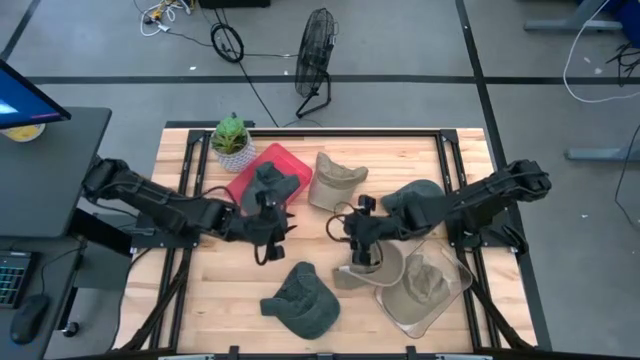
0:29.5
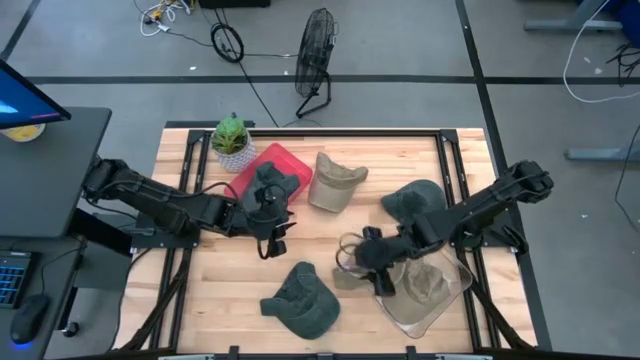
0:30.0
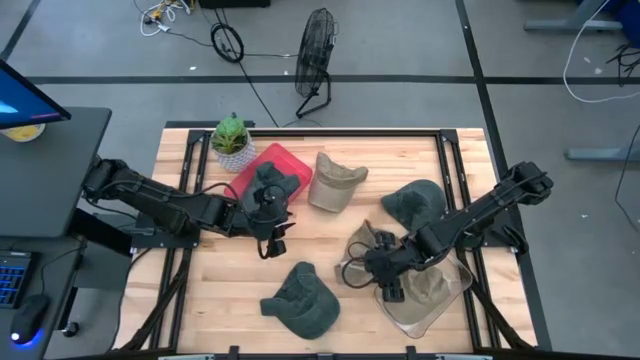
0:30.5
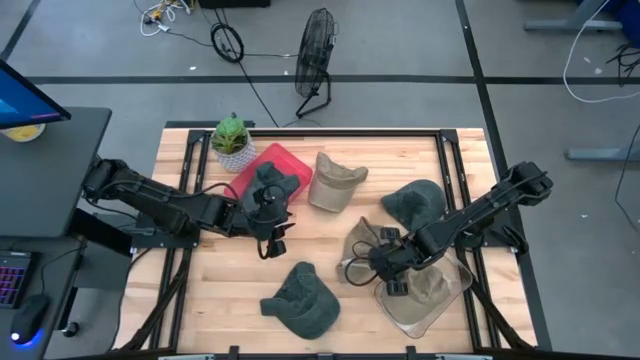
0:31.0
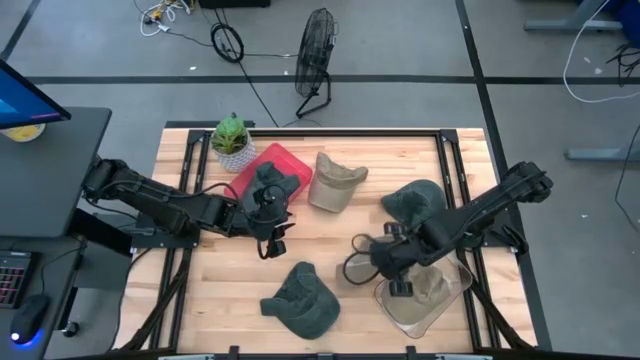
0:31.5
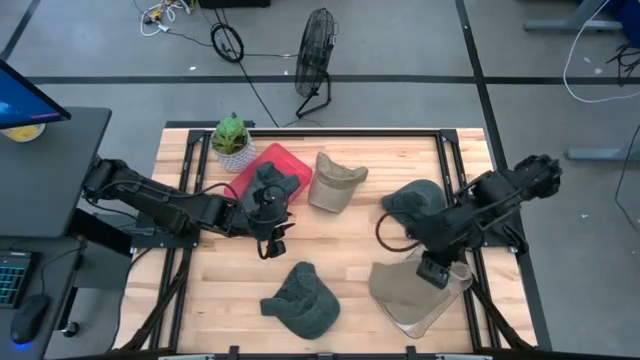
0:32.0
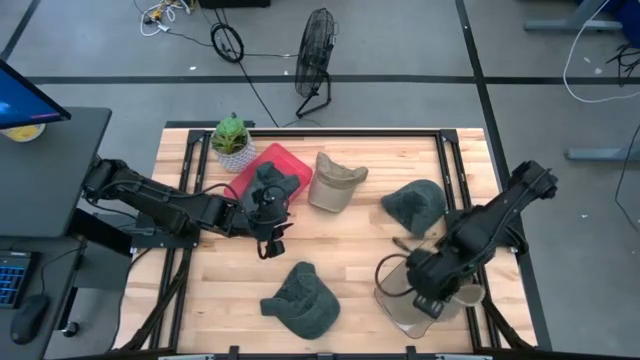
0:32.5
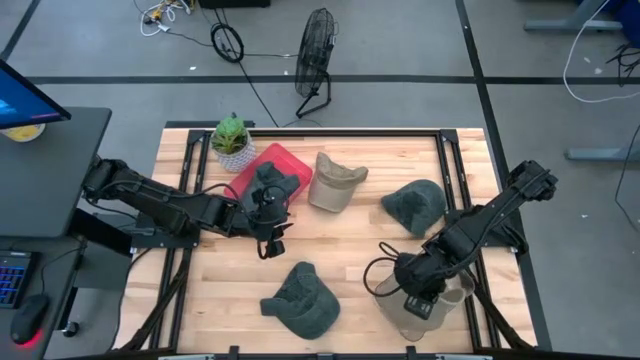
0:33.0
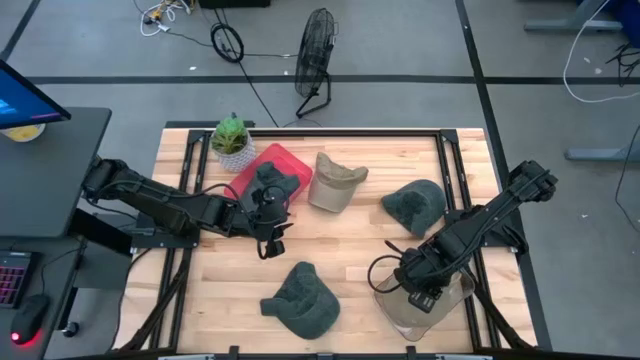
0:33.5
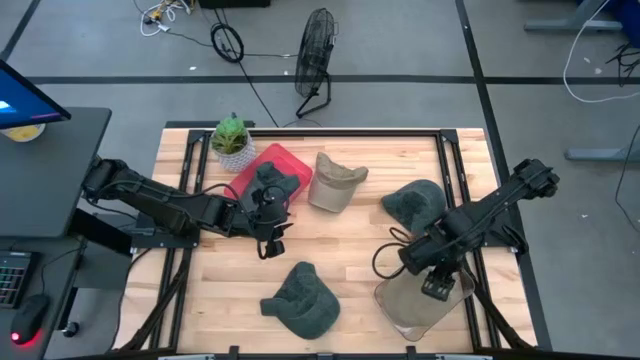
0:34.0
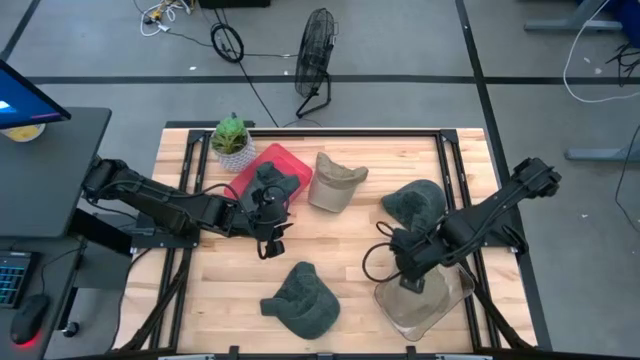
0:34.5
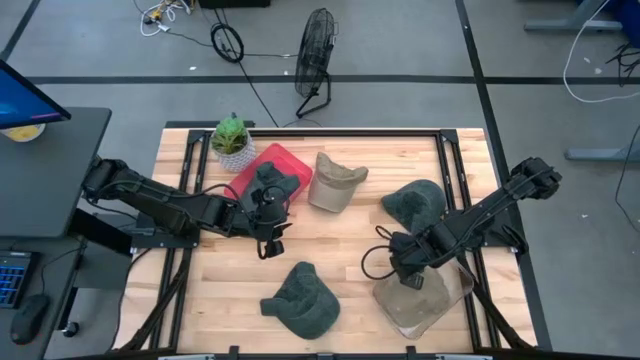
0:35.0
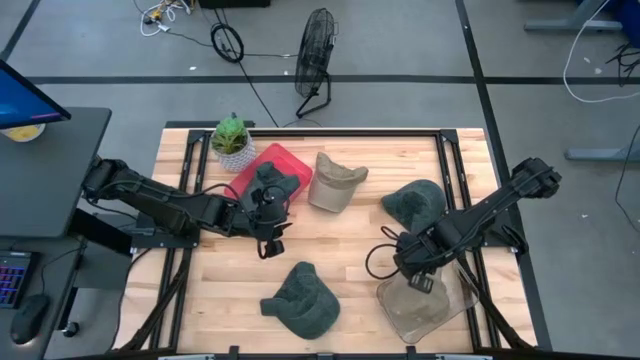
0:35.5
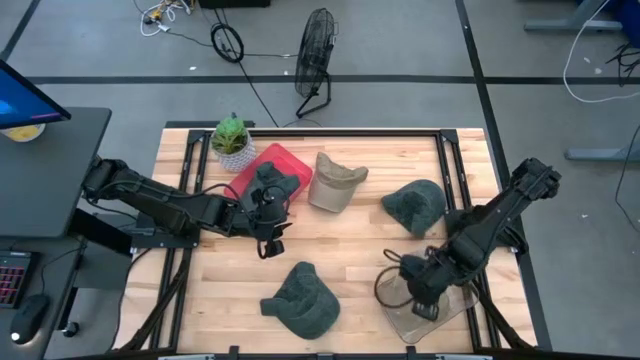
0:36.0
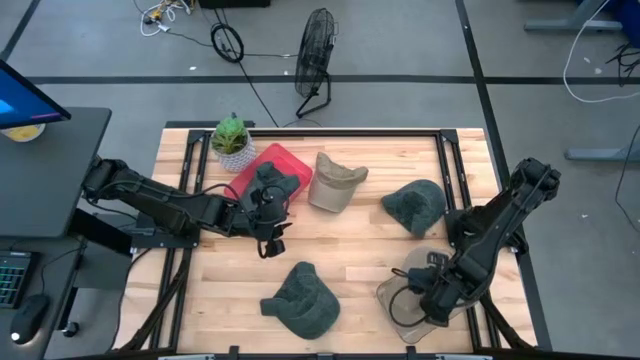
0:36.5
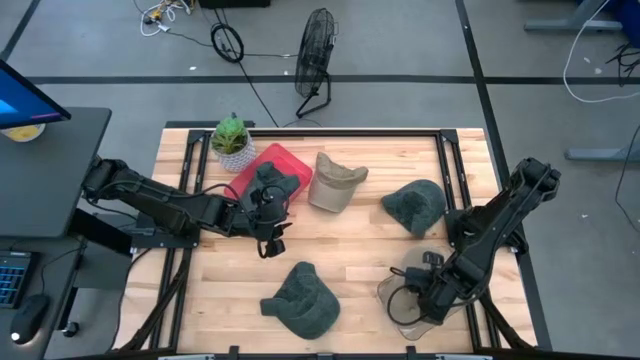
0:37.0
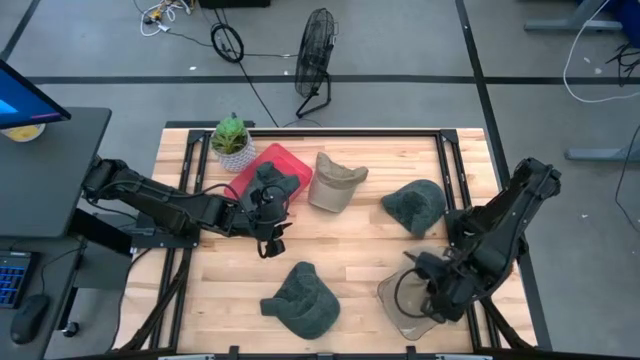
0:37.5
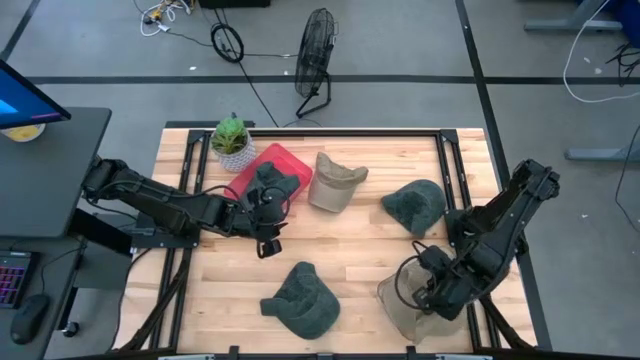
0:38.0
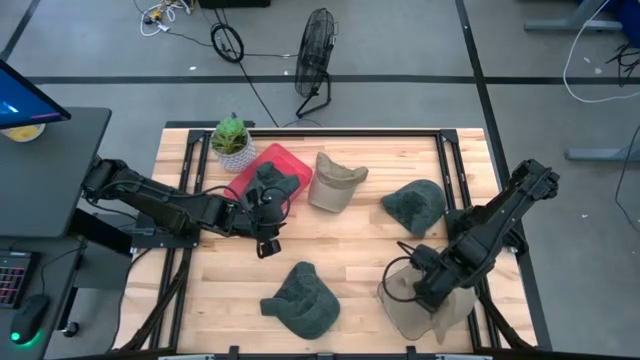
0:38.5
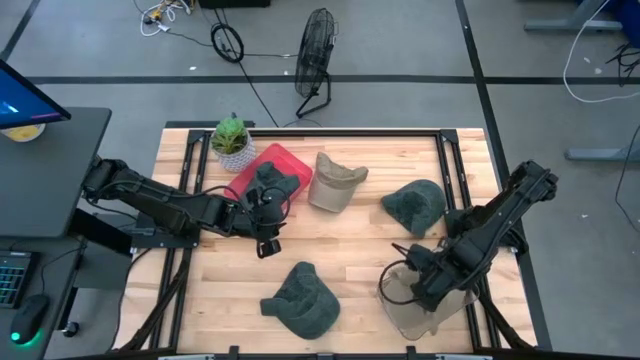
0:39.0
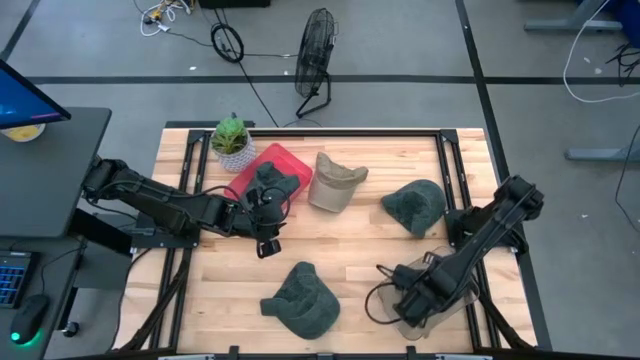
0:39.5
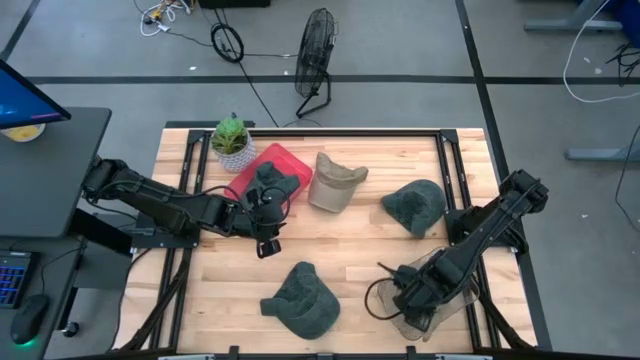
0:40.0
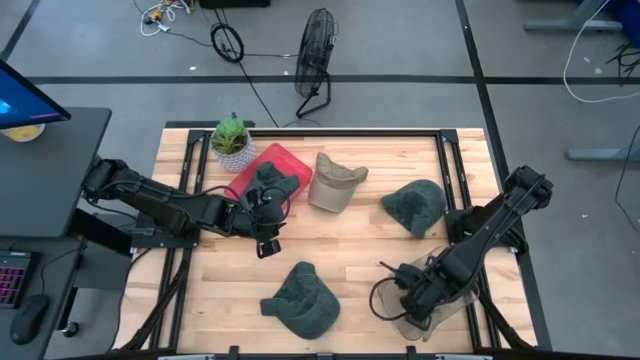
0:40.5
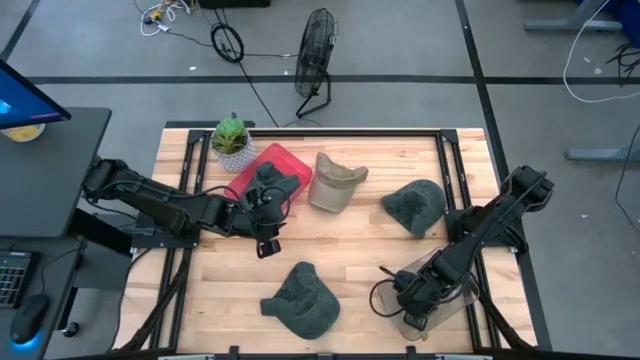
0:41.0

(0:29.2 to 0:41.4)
Task: Pick & Place hat
Put the bottom gray cap into the transparent bin

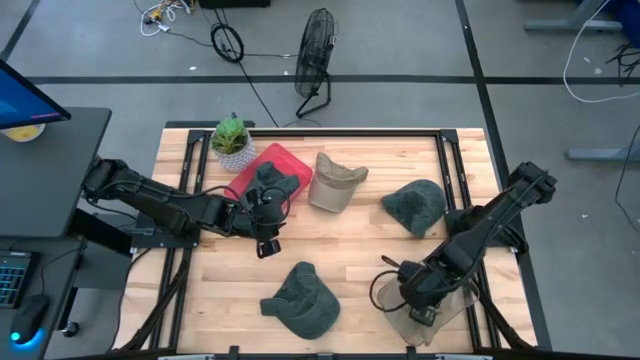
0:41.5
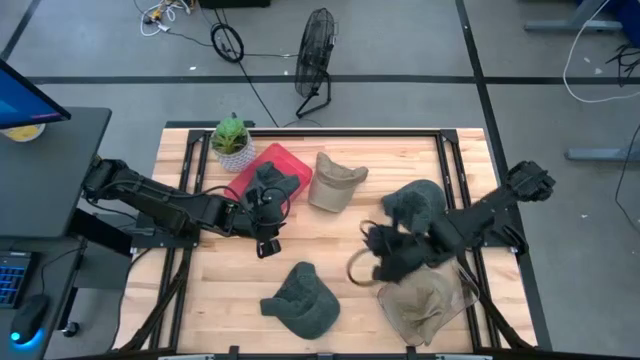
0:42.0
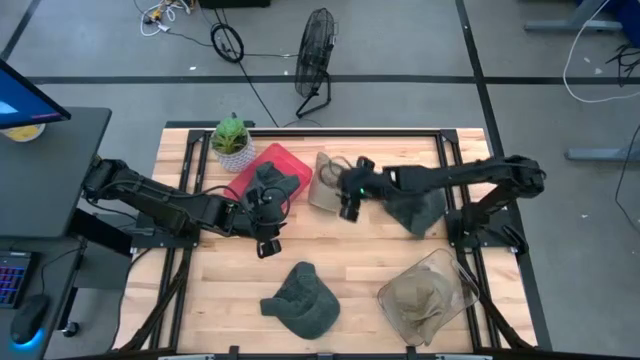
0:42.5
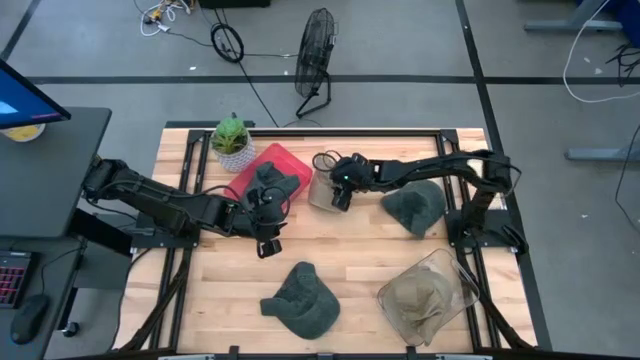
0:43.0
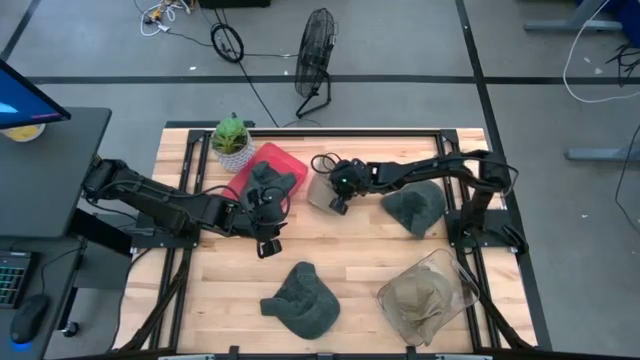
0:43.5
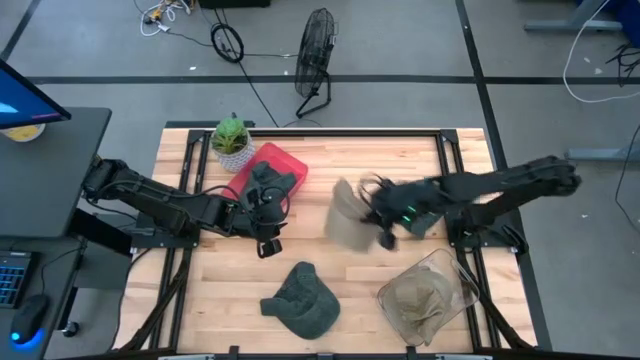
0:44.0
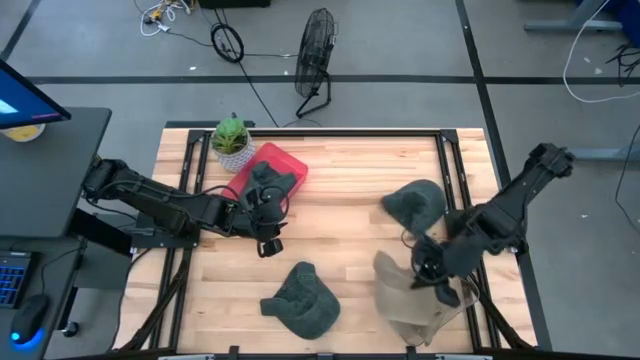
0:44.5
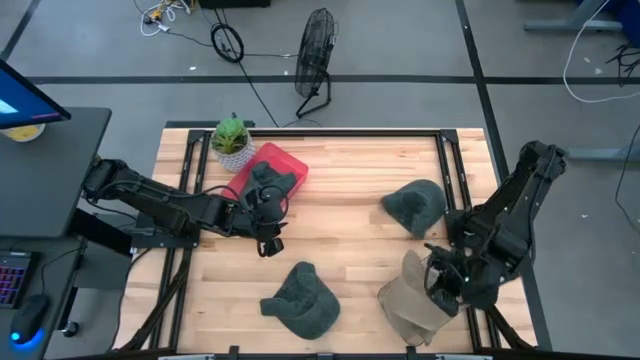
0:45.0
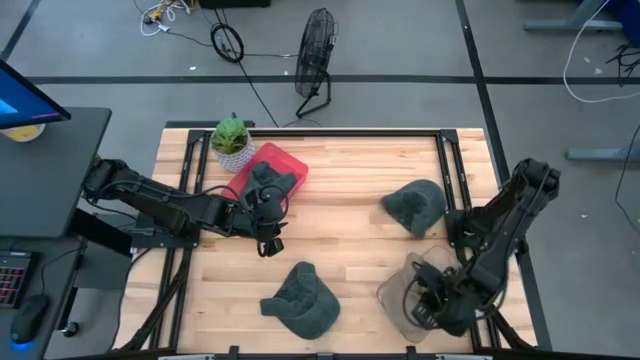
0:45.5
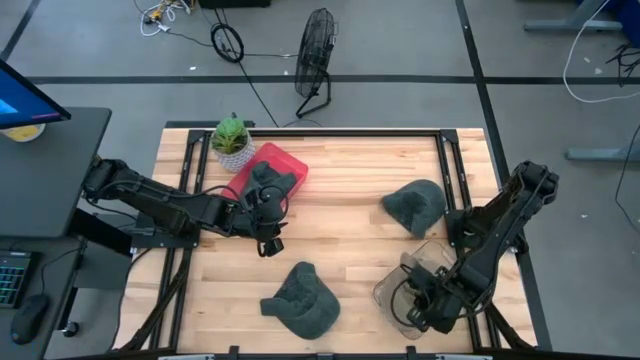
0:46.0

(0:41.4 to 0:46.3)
Put the gray cap into the transparent bin

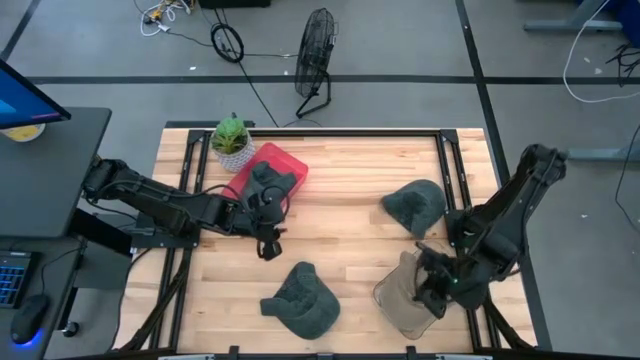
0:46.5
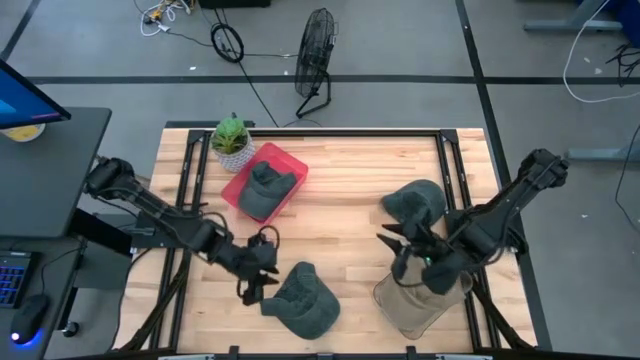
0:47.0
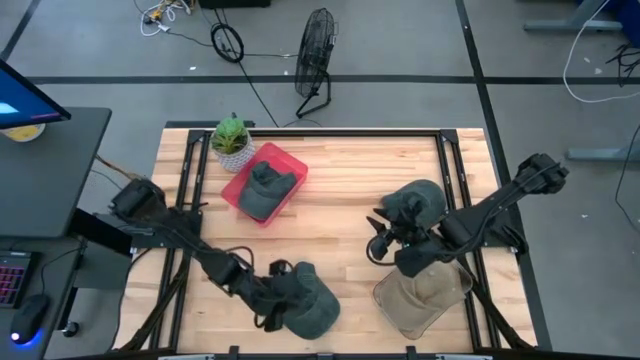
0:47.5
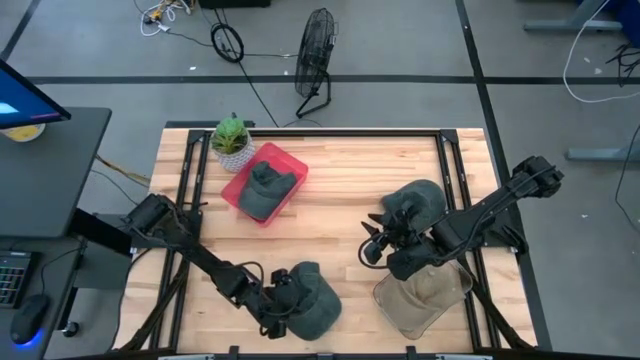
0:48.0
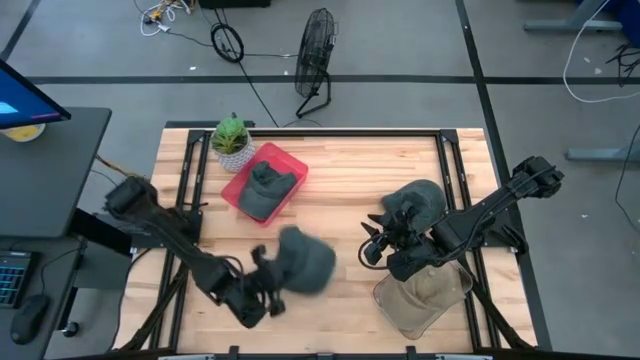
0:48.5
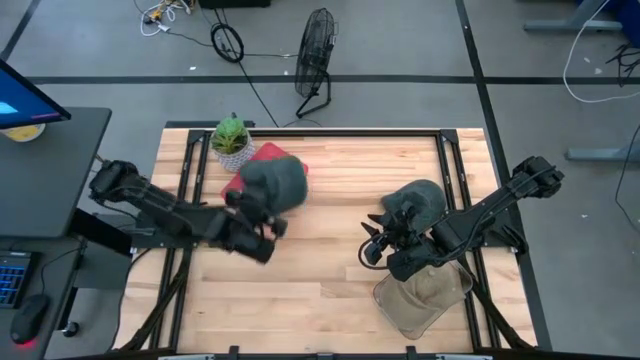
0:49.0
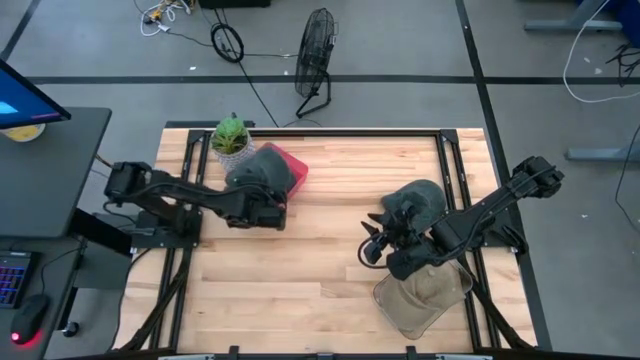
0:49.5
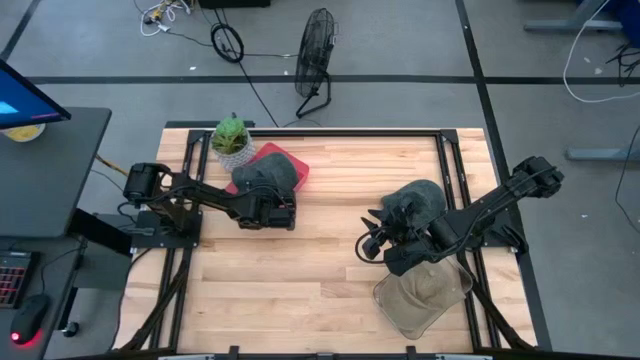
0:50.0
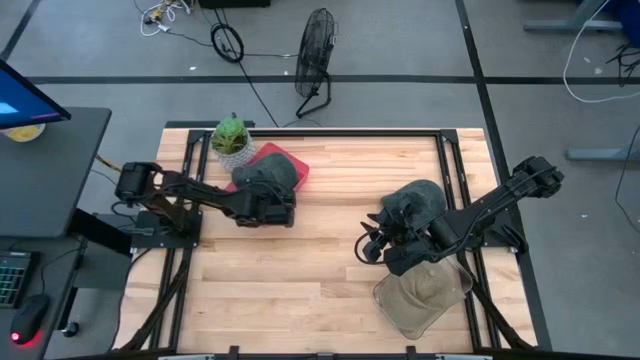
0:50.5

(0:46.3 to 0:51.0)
Put the bottom black cap into the red bin
